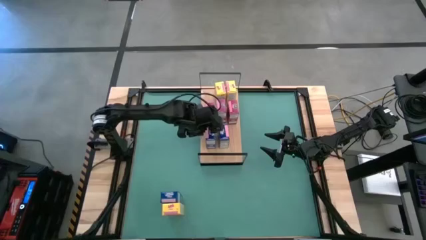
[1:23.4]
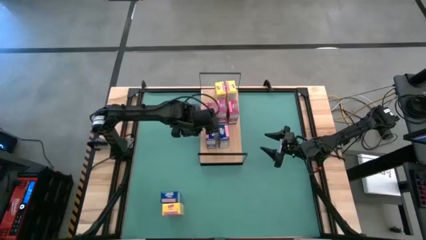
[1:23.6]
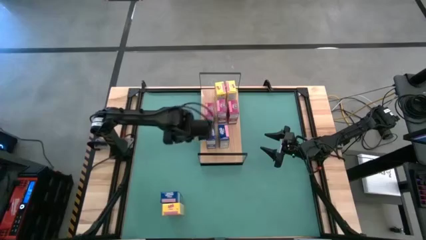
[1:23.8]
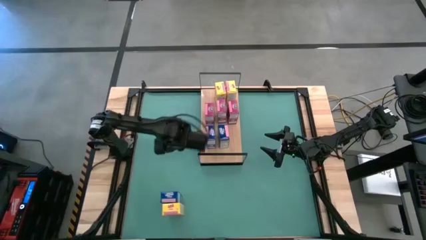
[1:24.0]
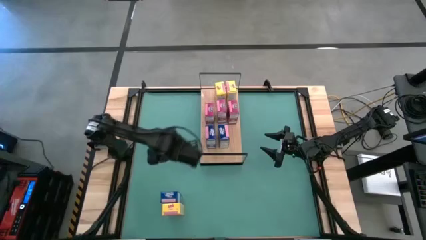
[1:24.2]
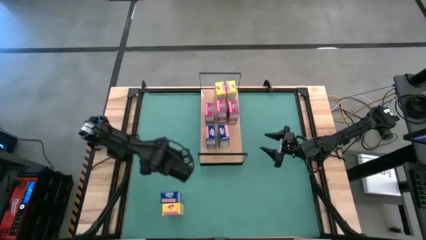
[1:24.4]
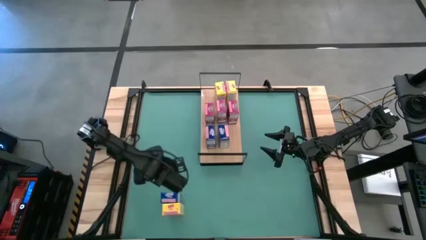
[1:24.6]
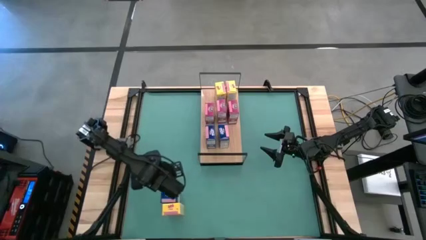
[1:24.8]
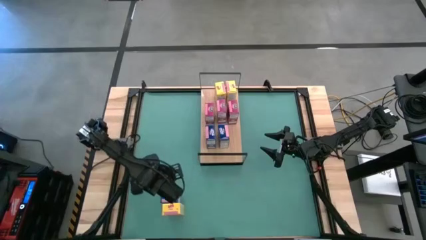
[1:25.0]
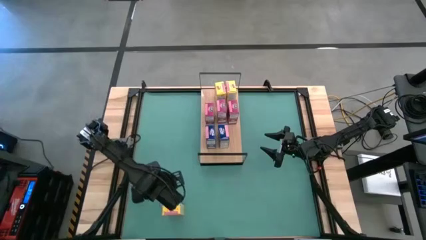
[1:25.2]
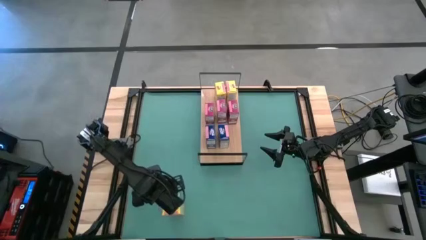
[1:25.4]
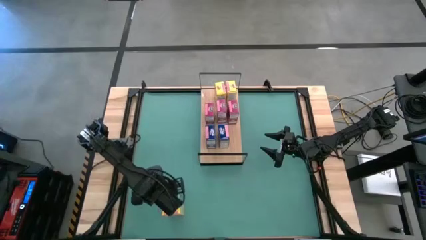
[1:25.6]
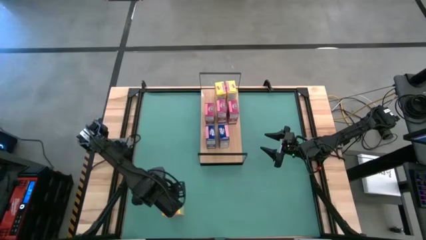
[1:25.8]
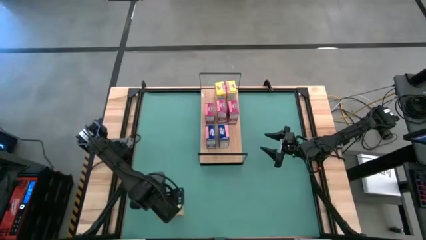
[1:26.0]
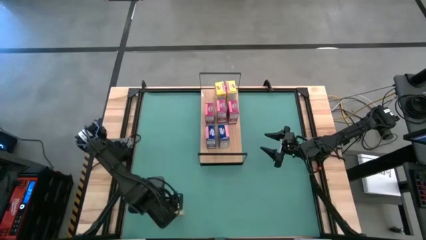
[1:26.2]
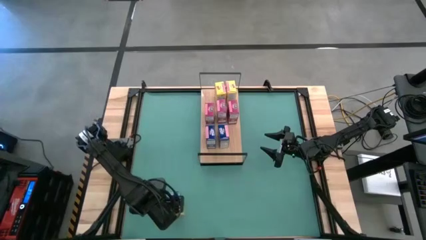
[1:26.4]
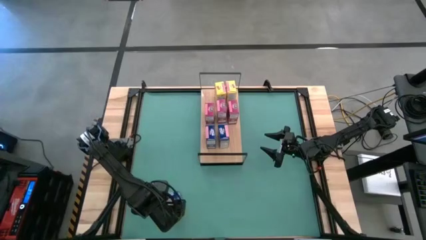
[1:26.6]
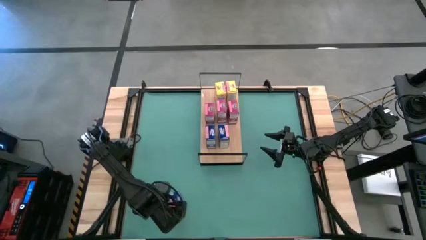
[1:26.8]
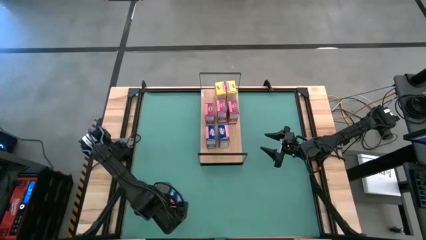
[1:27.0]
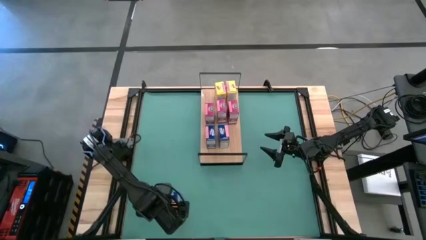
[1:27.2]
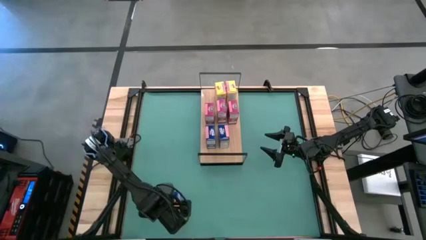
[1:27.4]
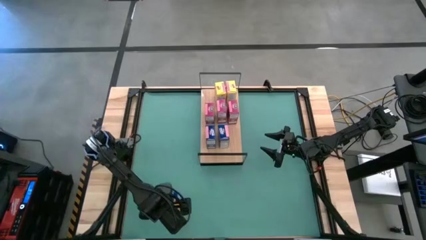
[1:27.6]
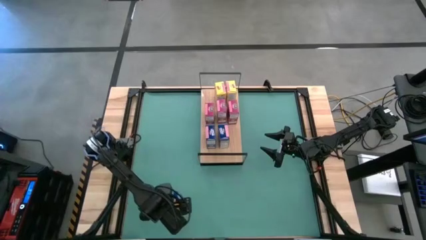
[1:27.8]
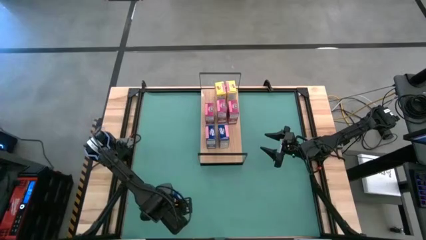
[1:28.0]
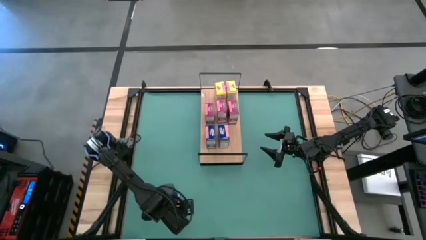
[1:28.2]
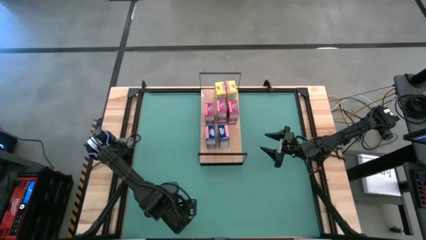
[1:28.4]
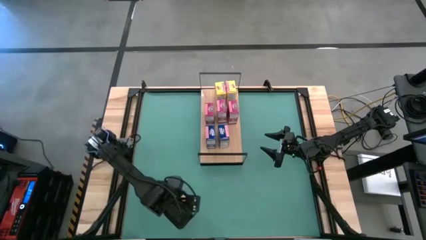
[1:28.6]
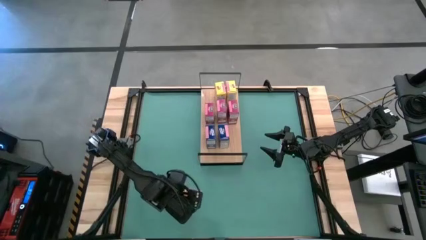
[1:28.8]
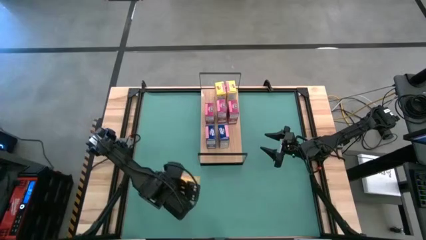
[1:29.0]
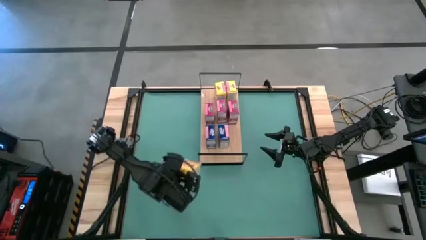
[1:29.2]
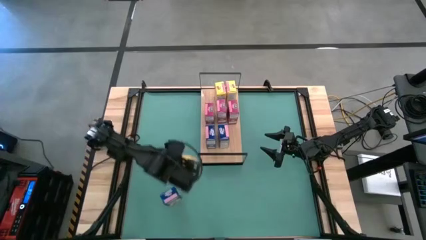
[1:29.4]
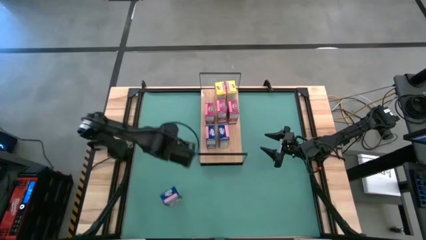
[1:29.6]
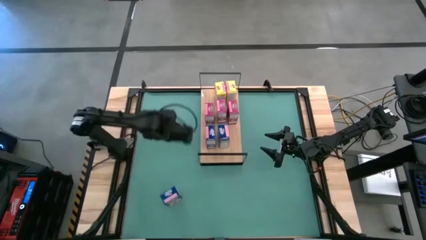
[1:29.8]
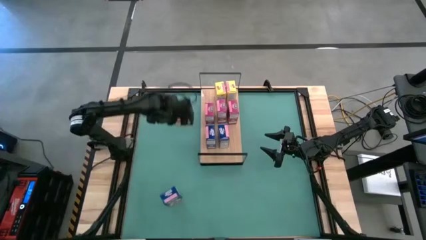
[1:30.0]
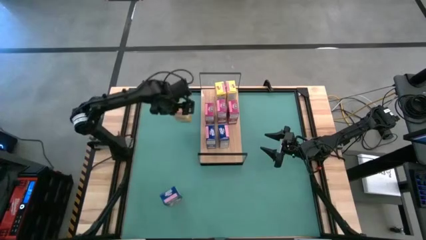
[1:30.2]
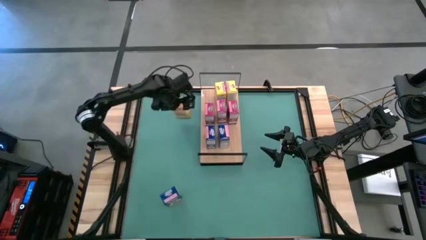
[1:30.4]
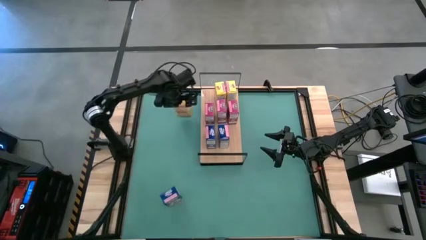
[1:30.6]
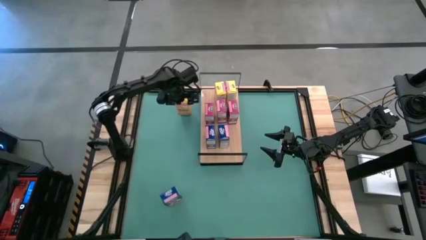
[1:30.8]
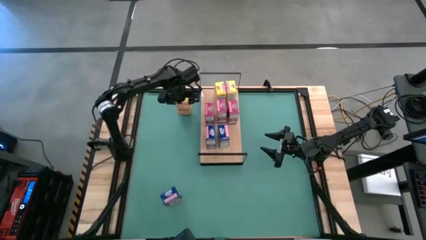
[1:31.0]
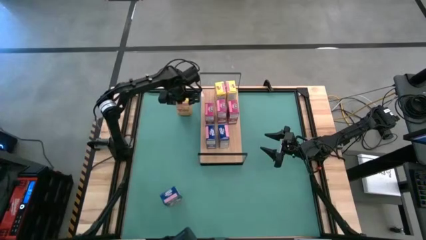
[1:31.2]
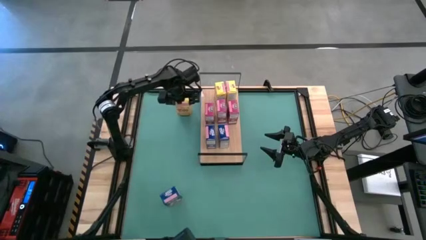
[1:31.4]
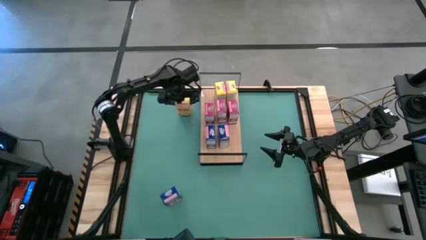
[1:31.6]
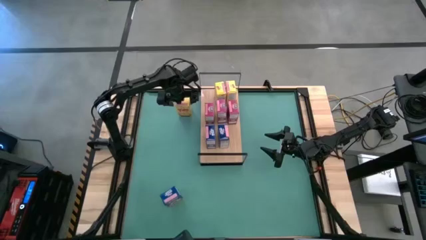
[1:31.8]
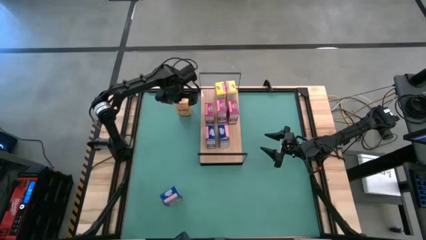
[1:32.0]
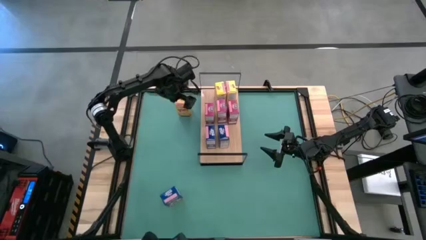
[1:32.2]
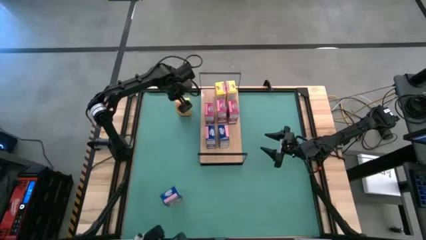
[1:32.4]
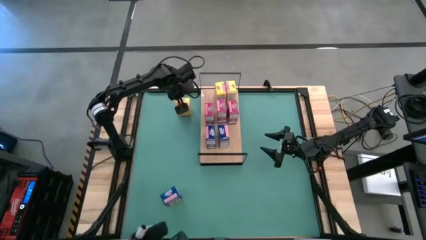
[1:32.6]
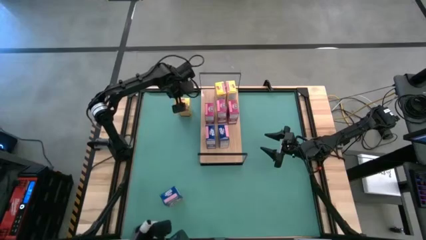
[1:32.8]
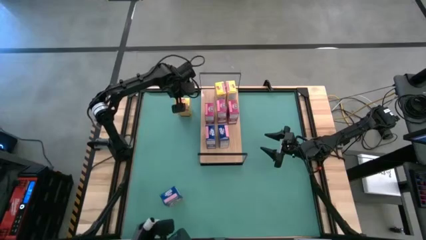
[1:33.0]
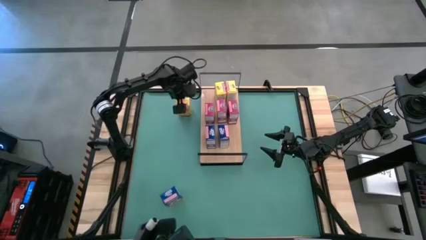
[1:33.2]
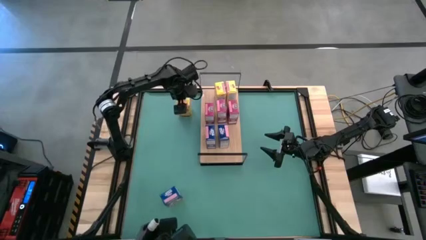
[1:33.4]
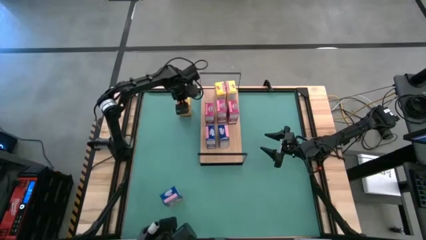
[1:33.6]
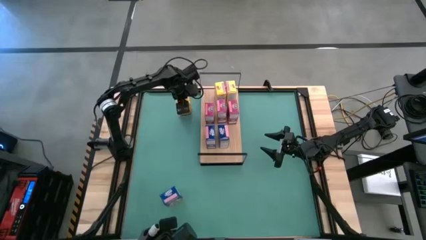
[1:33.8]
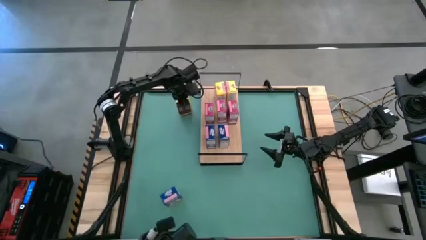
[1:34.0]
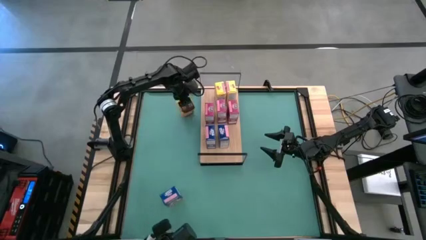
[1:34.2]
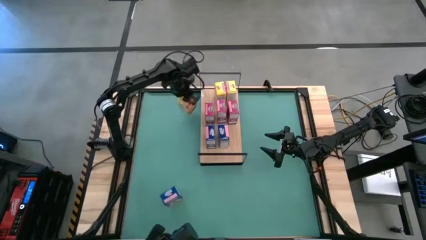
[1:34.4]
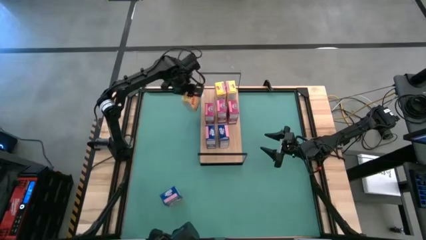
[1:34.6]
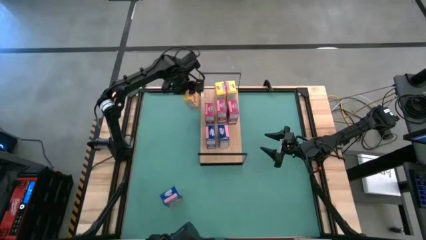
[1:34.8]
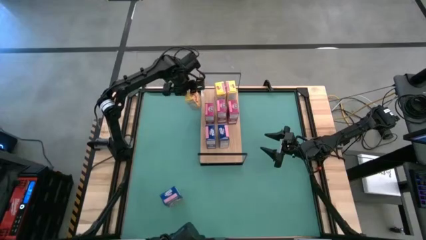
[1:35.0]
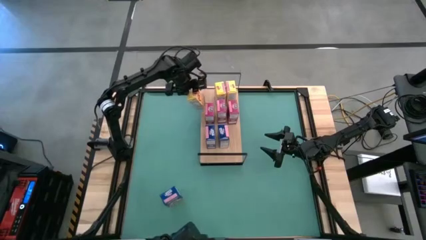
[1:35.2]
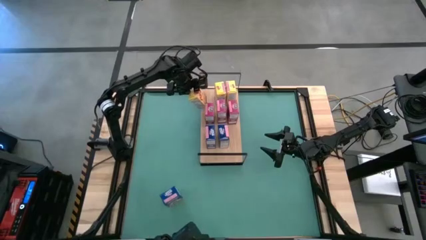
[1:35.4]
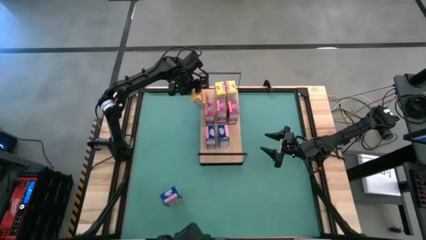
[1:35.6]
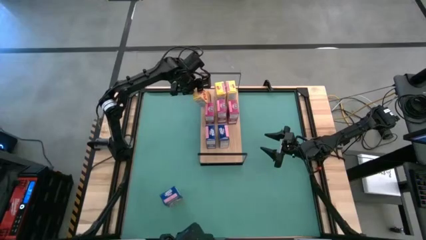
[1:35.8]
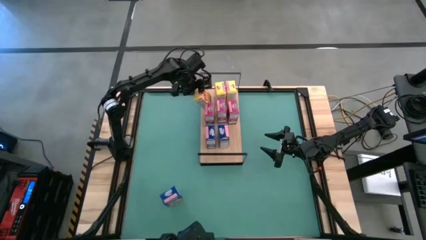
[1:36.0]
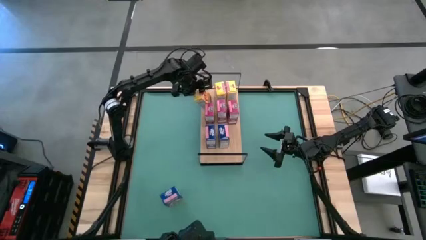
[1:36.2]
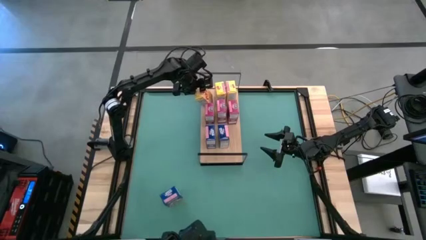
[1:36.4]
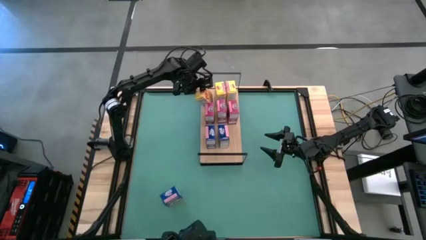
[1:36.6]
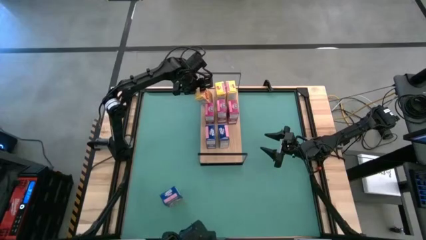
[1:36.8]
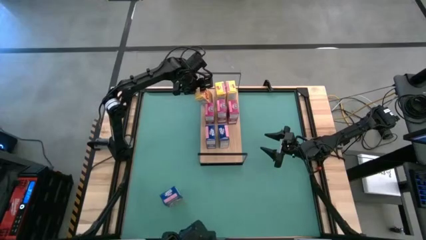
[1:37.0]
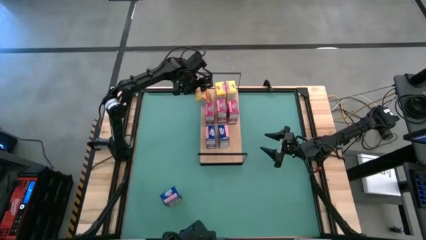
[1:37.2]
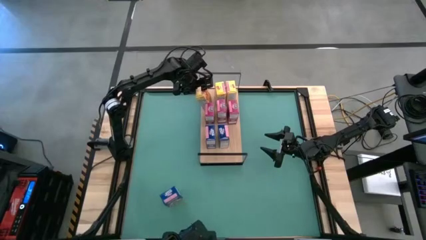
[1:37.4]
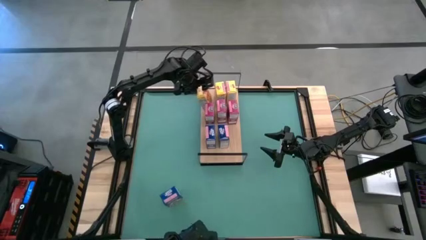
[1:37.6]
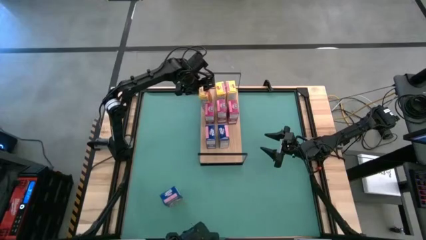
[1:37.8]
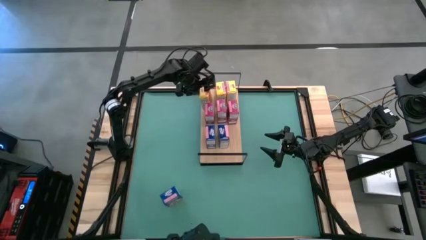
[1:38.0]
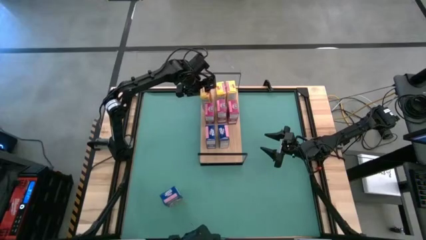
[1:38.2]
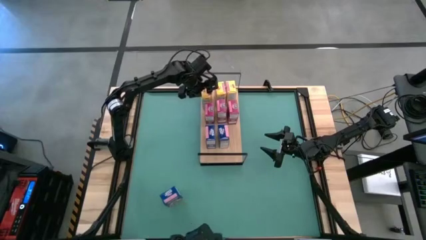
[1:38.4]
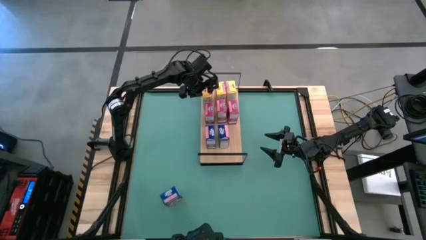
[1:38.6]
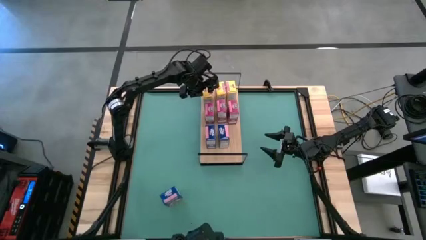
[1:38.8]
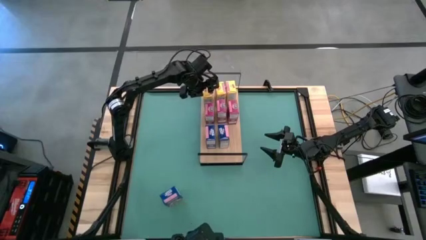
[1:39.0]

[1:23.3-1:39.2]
Task: Stack cereal on shelf
Put the yellow cereal box on the shelf aligned with the other yellow cereal boxes
